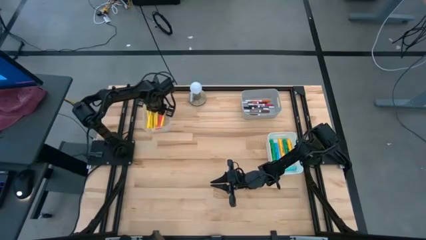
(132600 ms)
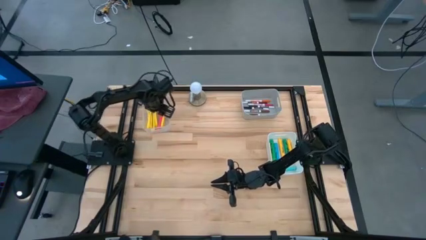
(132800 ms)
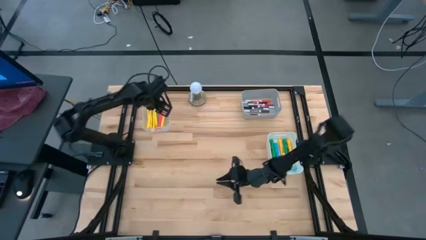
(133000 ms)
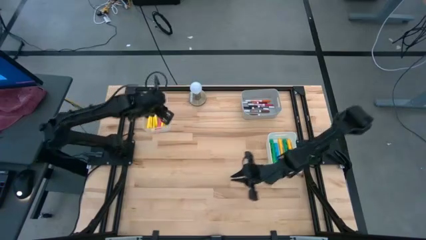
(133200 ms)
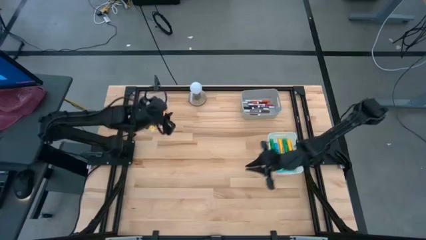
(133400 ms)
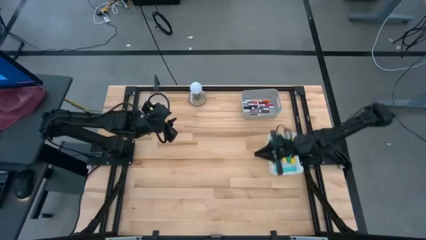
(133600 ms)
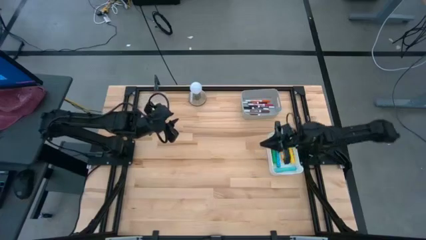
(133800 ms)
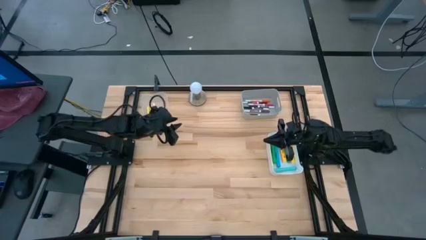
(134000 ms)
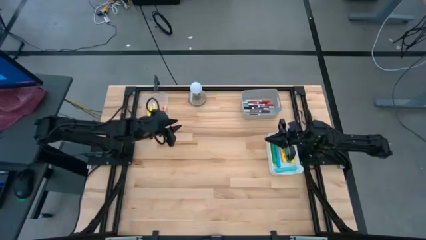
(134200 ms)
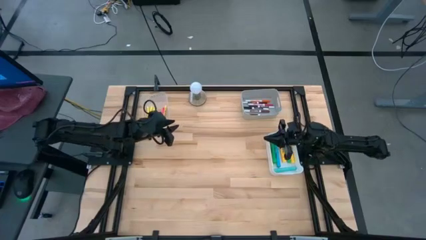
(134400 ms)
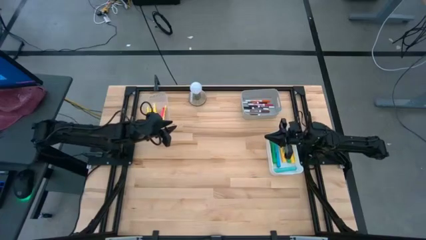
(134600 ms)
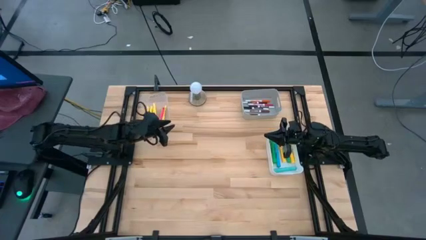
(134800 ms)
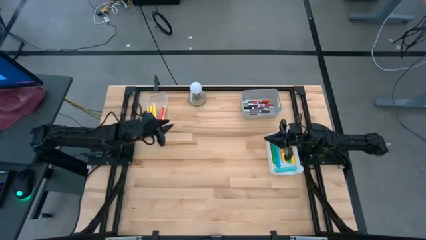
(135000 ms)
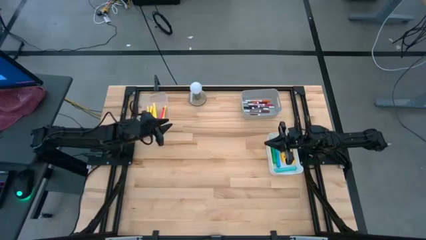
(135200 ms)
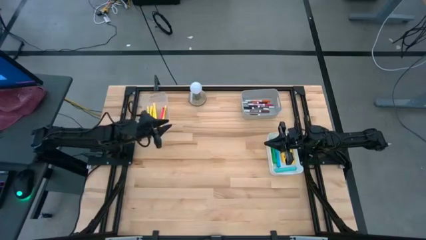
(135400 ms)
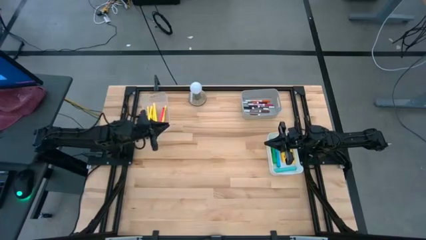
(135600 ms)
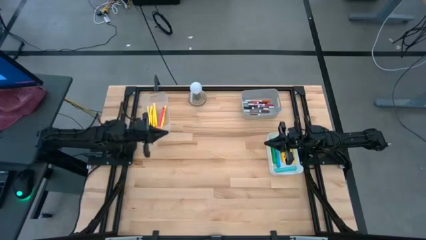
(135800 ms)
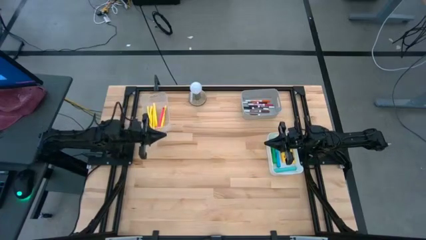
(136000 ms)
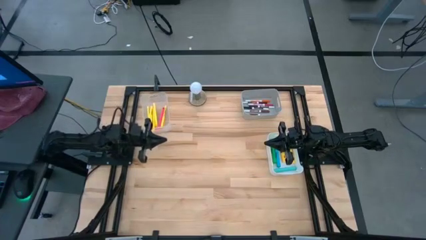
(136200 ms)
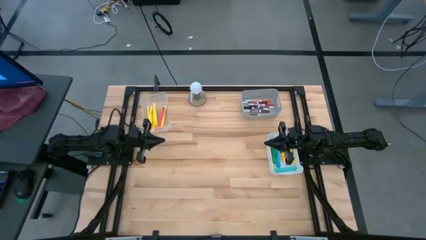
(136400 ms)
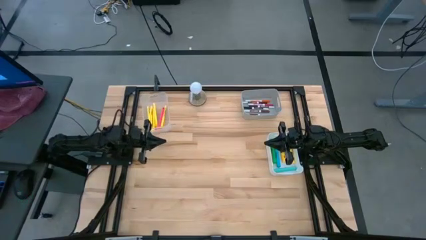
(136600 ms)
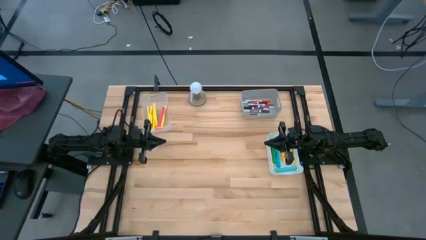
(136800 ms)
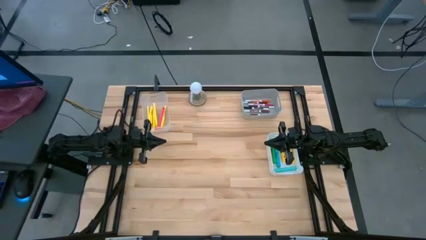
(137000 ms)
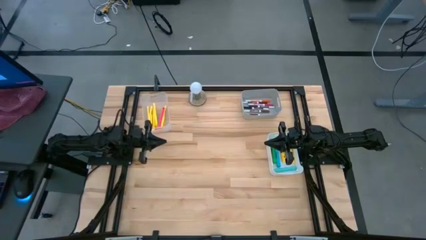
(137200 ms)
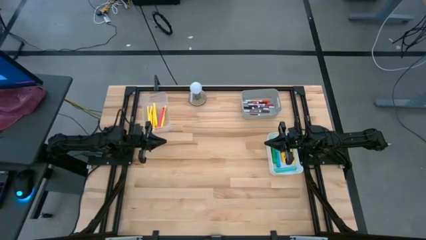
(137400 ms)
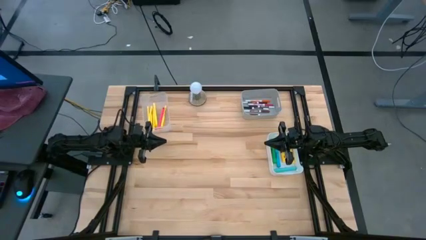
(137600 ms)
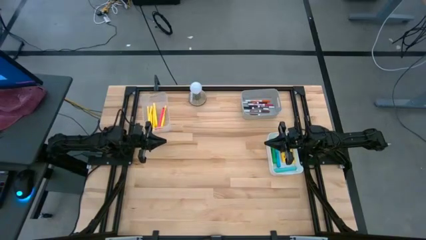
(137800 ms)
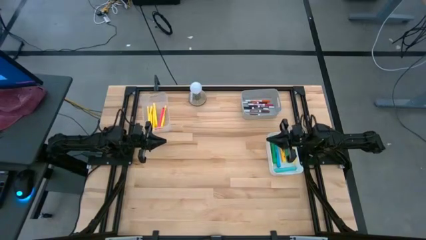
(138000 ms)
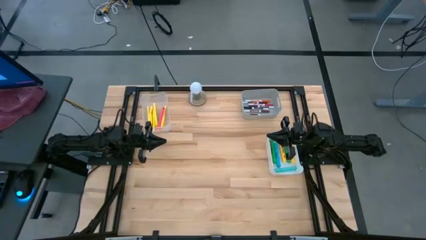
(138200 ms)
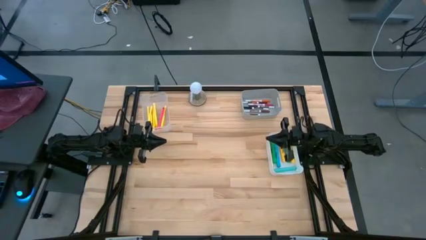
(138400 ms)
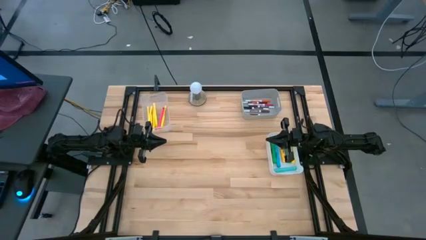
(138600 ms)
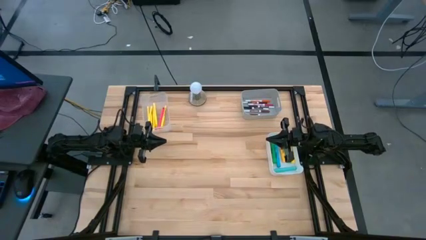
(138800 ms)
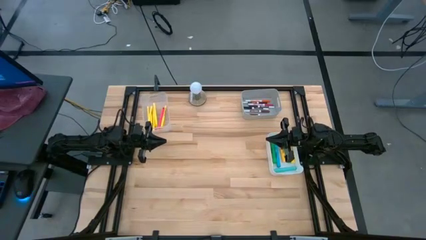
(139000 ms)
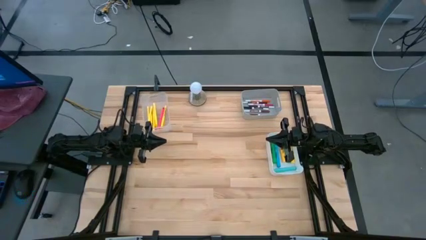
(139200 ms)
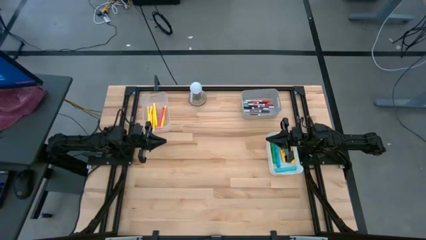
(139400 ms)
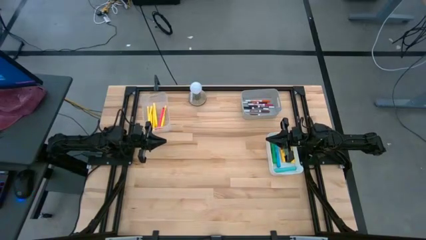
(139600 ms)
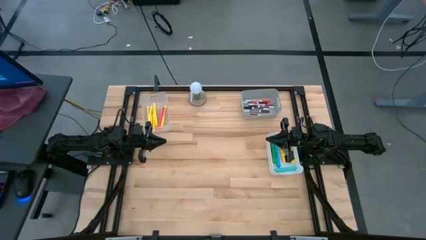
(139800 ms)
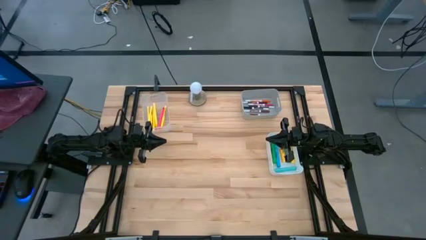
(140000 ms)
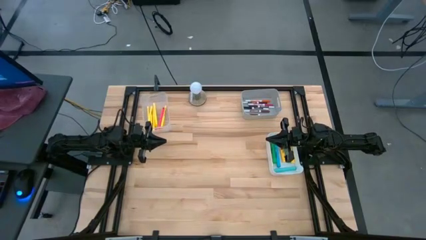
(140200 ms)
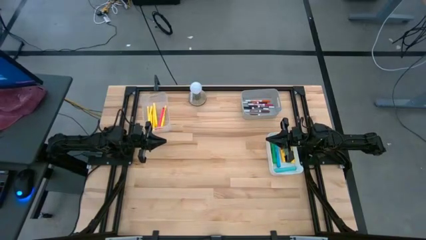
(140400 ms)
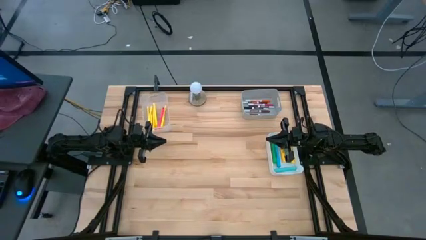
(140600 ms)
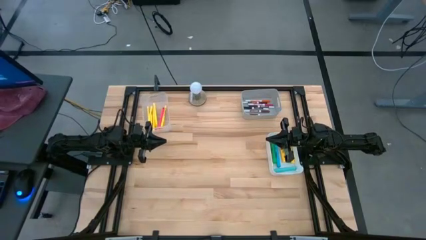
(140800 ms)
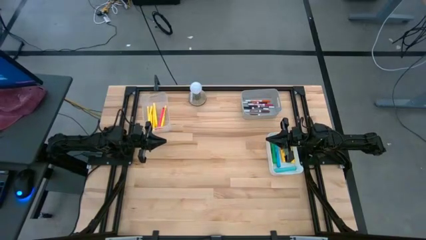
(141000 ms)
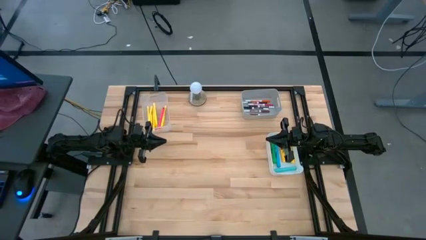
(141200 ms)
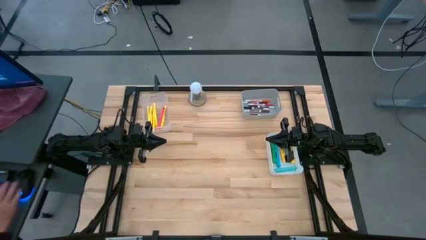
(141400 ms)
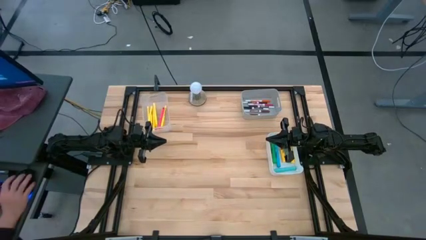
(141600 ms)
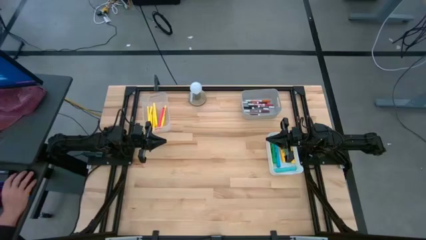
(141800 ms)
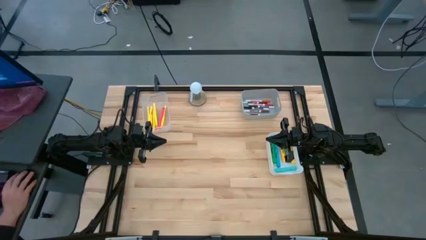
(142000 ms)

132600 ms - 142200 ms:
Task: Pick & Place Markers
Return to home position

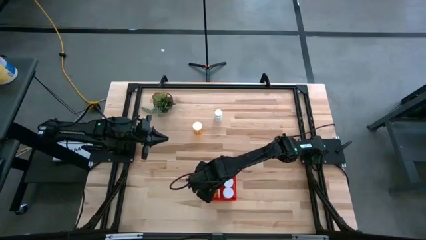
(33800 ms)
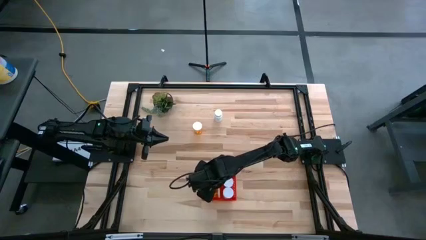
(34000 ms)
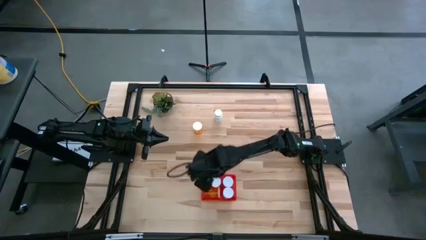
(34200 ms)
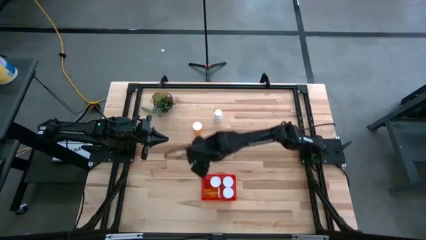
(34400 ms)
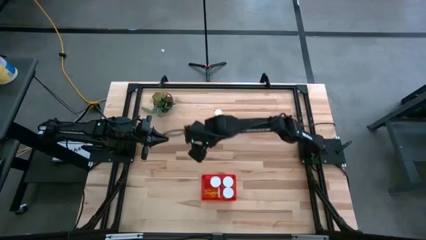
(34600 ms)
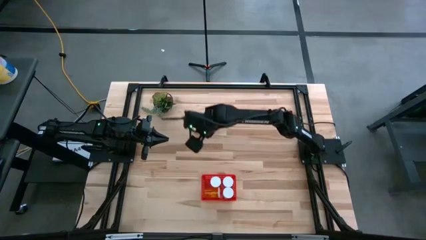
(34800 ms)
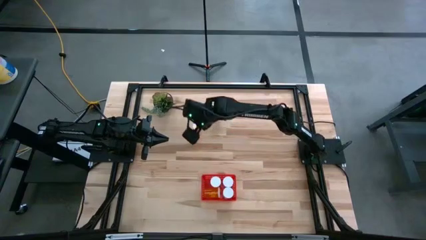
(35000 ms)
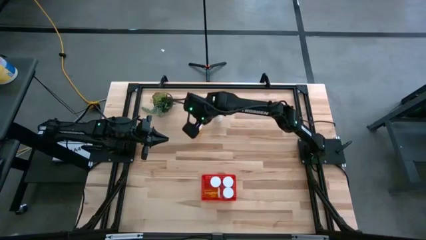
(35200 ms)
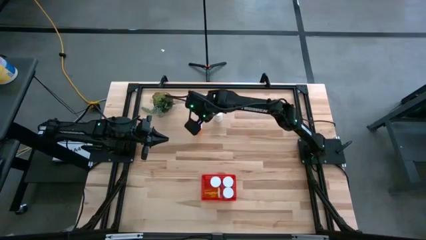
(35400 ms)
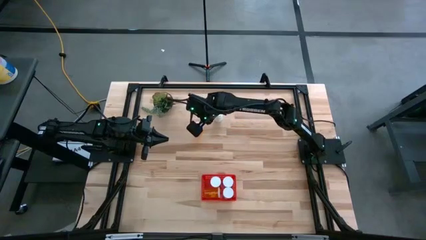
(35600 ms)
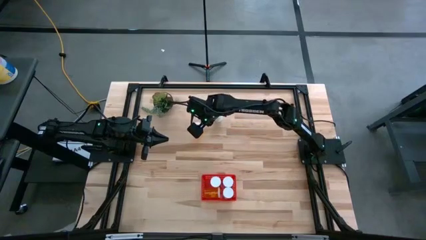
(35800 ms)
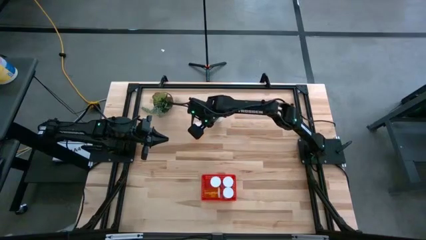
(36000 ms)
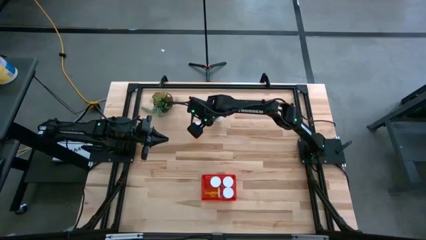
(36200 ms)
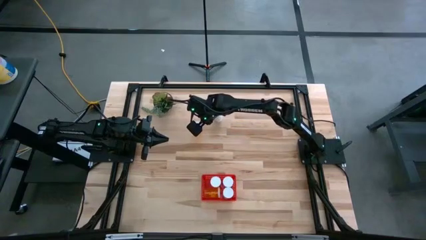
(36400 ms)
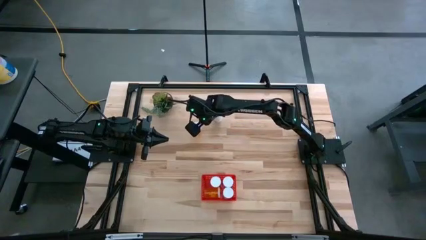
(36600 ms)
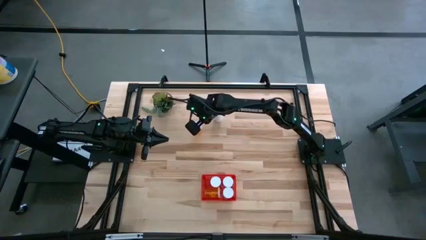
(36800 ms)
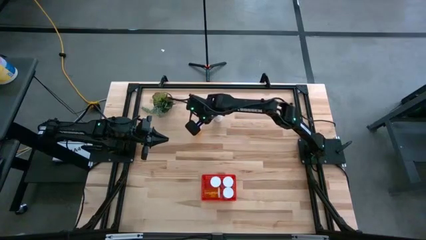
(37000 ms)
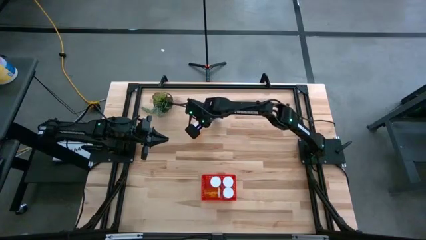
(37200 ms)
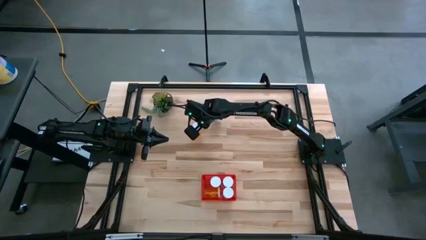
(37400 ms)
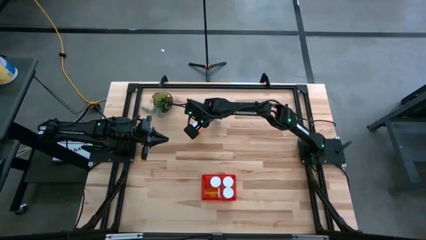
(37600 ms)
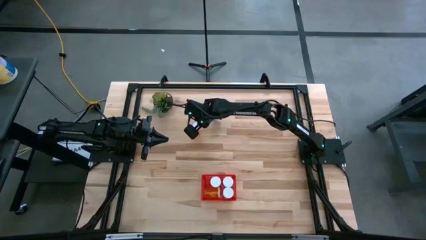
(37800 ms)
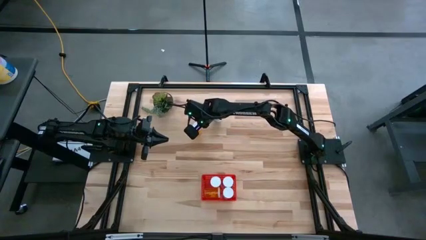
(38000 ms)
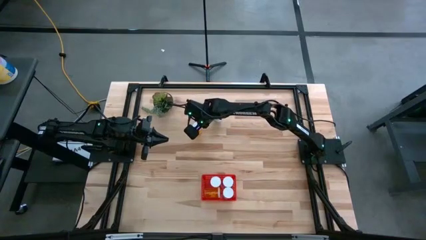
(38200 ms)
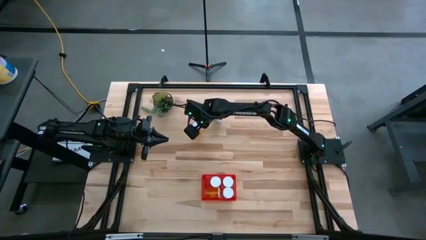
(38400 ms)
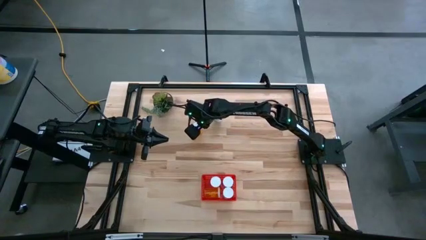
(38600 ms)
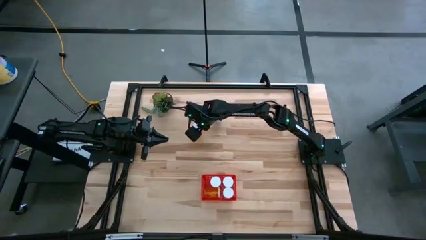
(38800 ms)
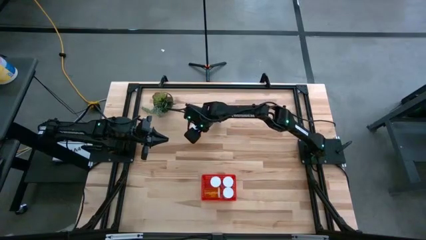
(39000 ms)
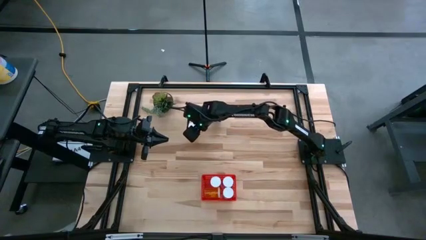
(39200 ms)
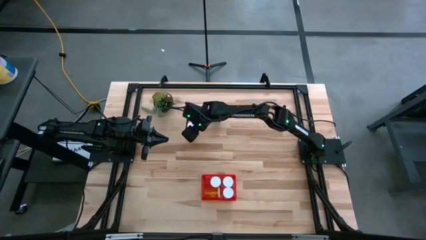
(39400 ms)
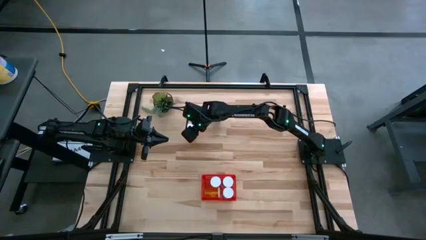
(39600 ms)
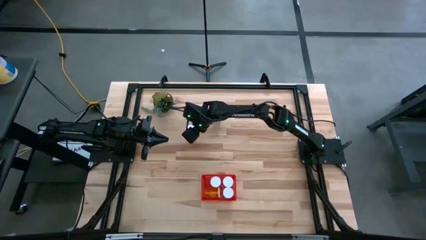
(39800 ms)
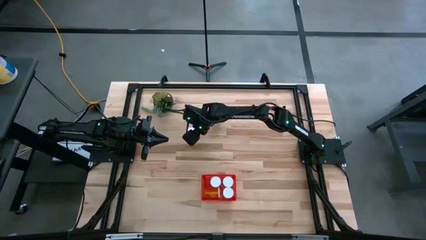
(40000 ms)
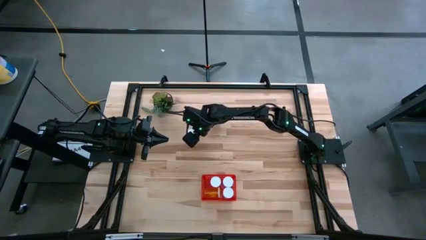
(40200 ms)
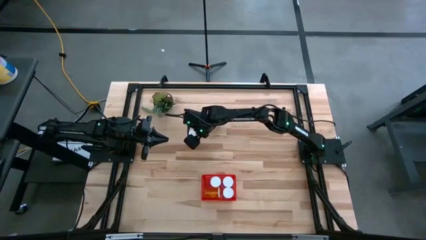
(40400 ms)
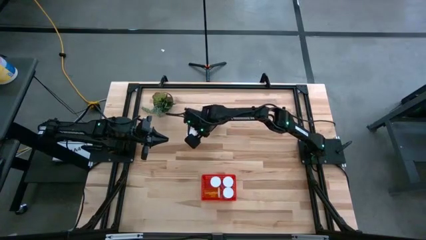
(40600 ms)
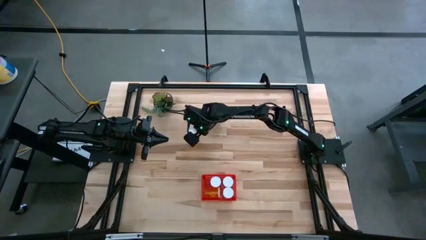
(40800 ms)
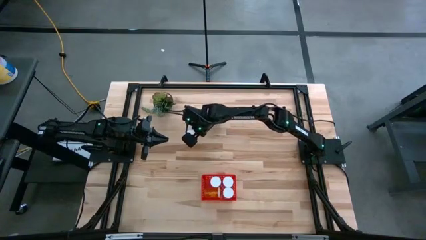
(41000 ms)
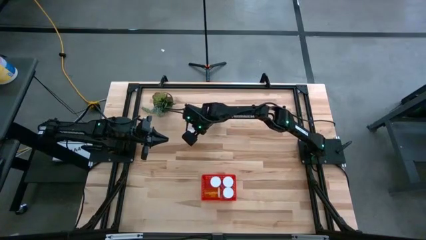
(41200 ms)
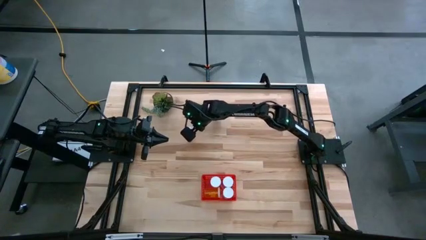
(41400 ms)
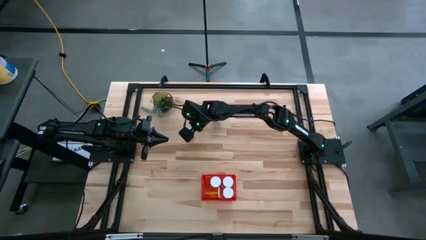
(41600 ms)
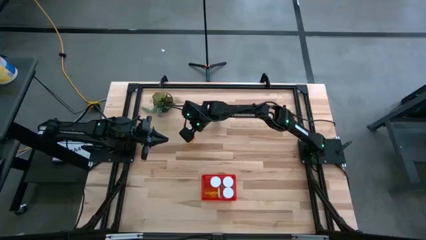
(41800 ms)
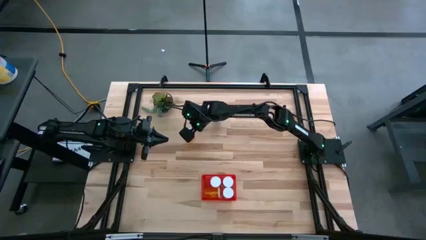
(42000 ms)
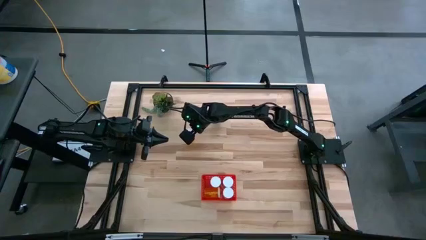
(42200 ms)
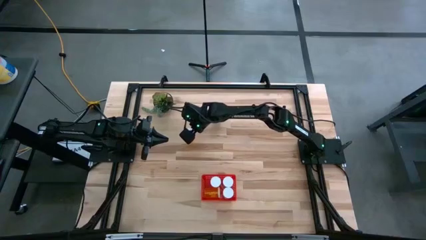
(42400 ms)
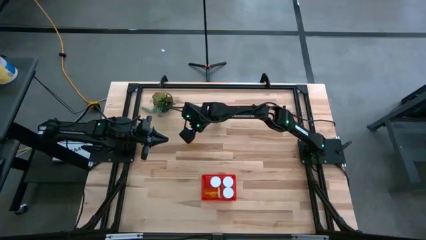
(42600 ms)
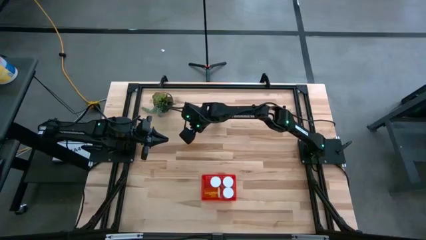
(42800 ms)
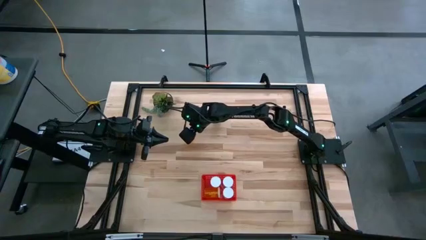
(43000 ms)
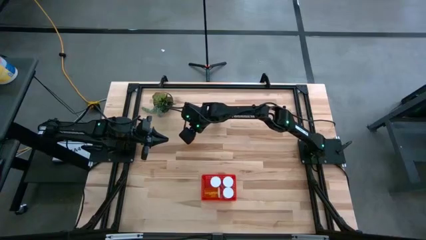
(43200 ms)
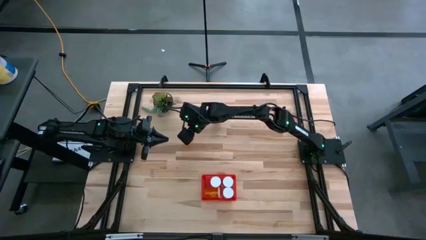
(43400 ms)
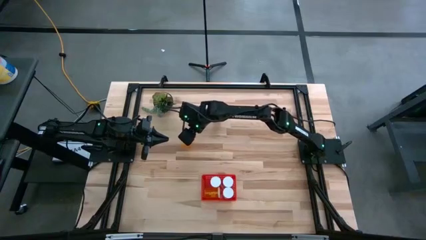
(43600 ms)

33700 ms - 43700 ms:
Task: Pick and place pill bottles into a basket
Put the orange pill bottle into the red bin
